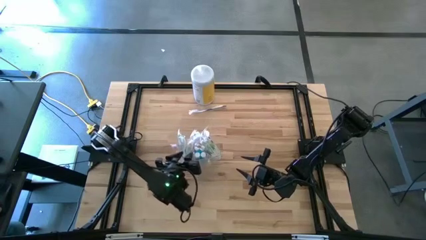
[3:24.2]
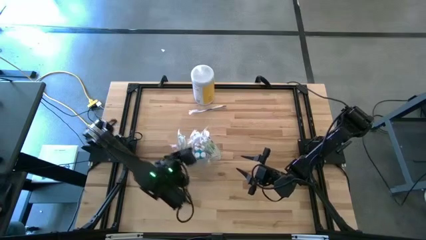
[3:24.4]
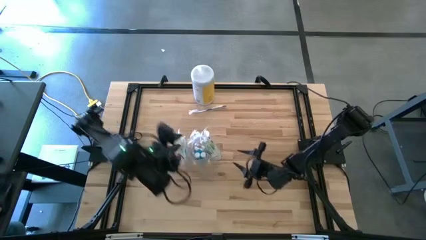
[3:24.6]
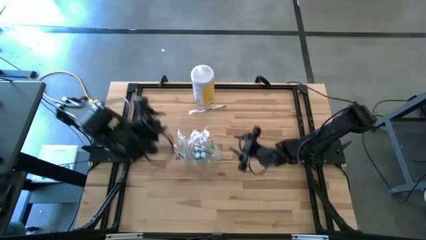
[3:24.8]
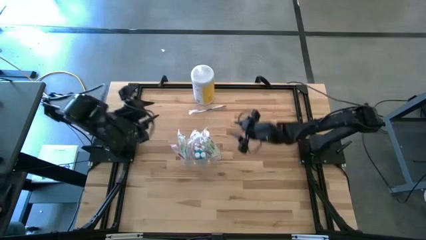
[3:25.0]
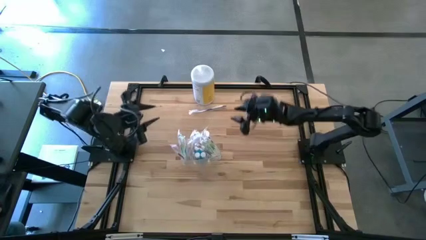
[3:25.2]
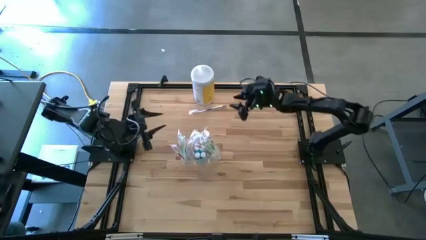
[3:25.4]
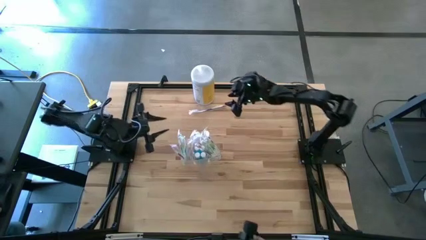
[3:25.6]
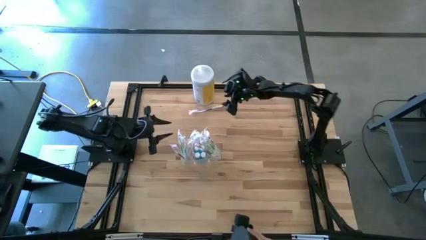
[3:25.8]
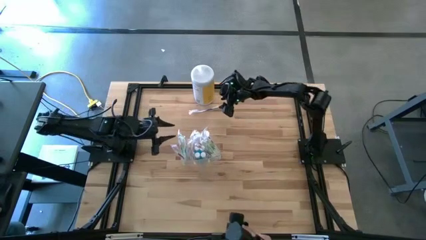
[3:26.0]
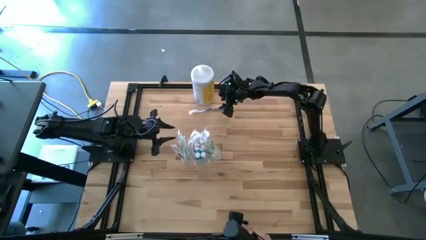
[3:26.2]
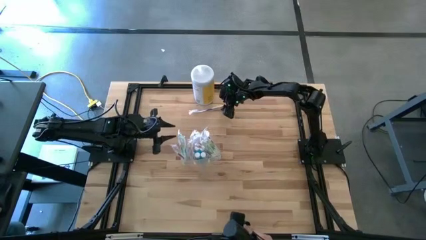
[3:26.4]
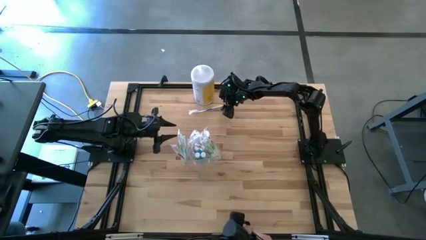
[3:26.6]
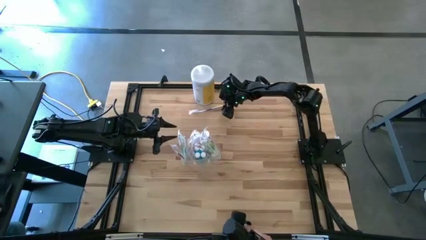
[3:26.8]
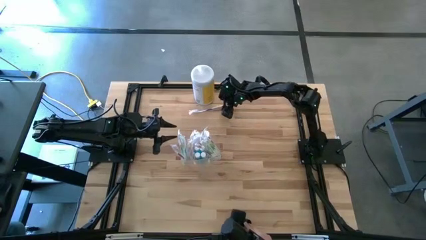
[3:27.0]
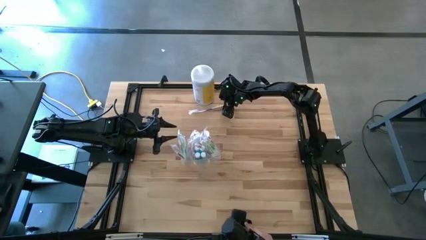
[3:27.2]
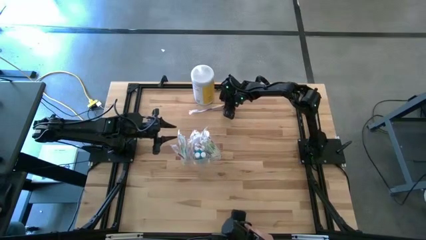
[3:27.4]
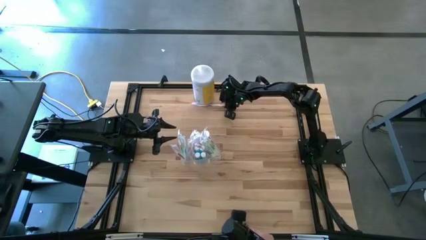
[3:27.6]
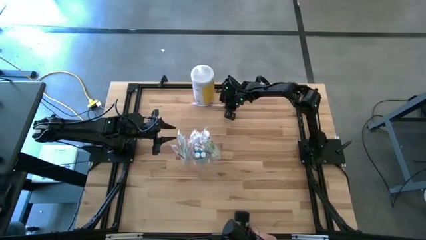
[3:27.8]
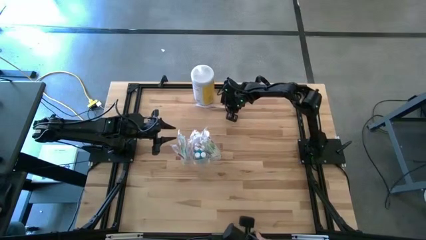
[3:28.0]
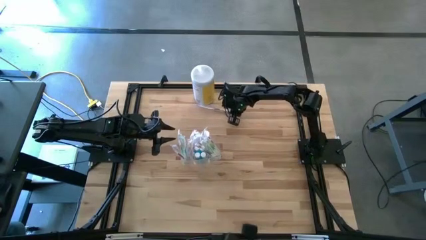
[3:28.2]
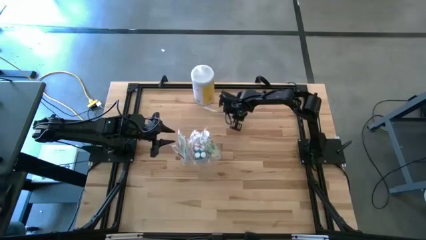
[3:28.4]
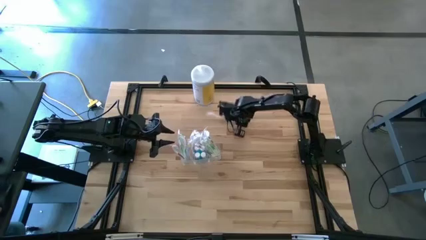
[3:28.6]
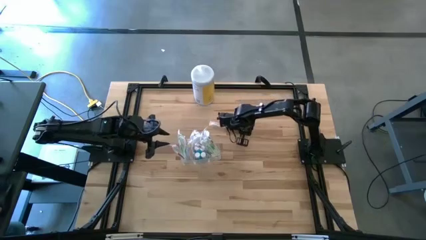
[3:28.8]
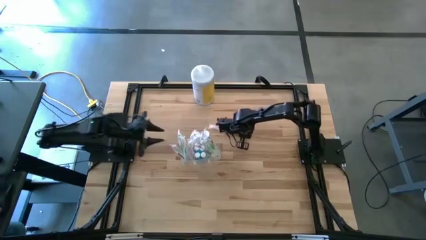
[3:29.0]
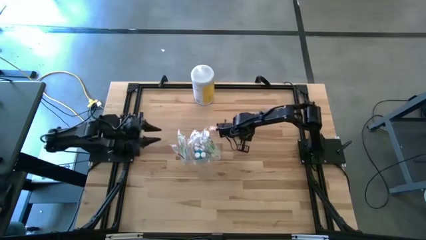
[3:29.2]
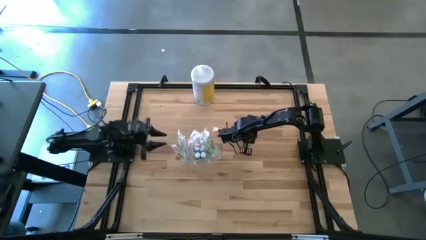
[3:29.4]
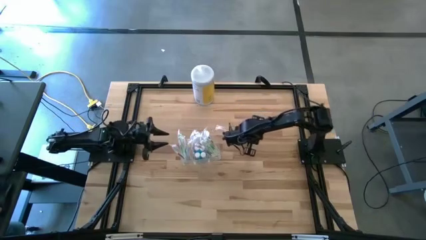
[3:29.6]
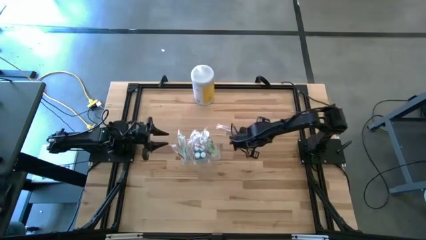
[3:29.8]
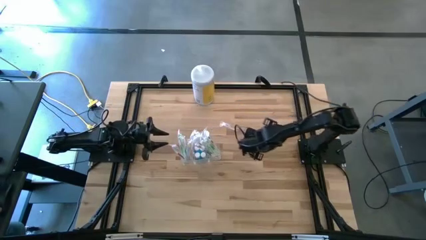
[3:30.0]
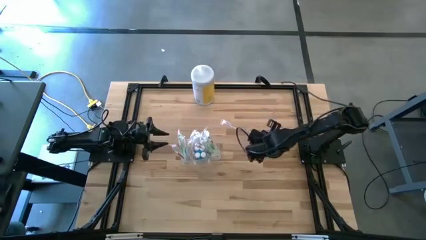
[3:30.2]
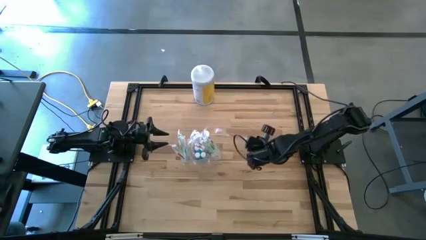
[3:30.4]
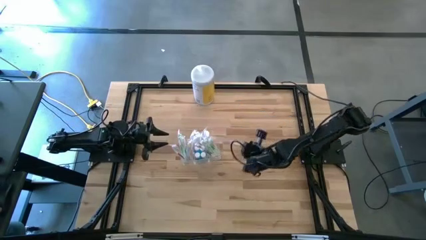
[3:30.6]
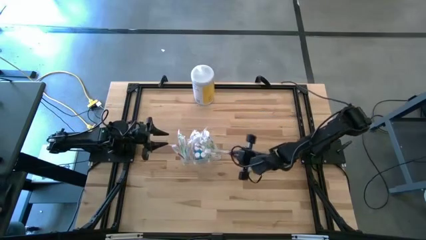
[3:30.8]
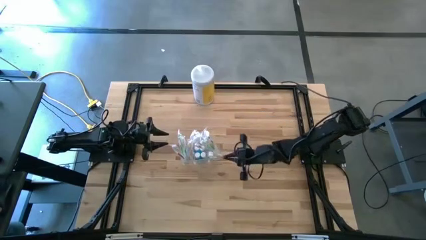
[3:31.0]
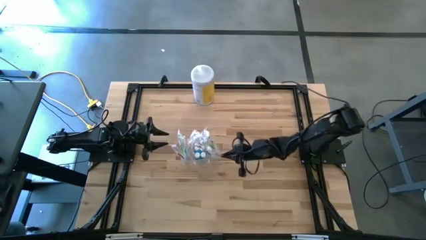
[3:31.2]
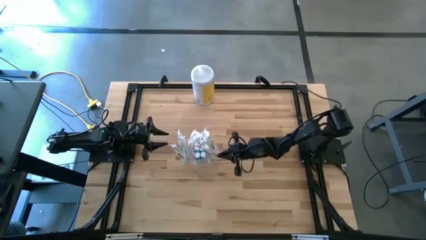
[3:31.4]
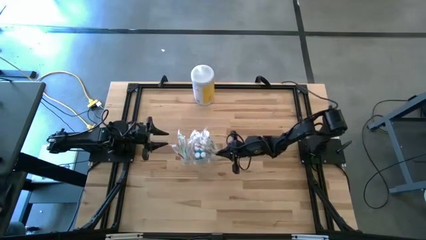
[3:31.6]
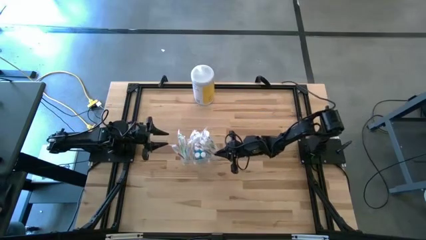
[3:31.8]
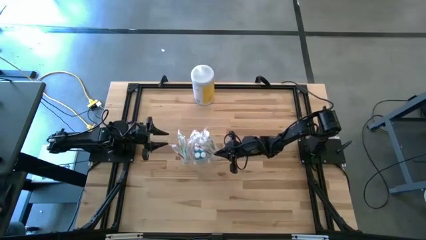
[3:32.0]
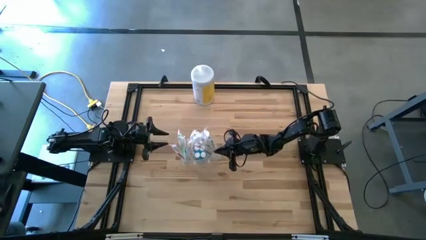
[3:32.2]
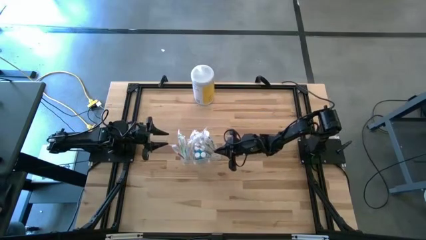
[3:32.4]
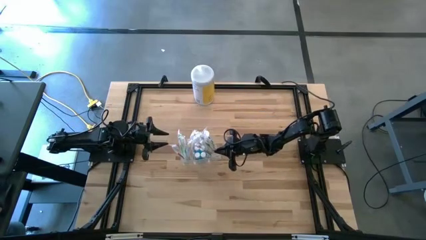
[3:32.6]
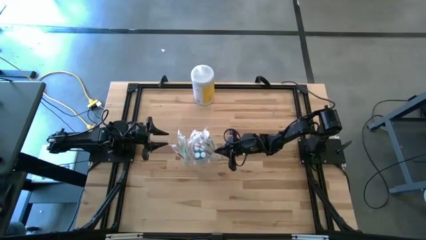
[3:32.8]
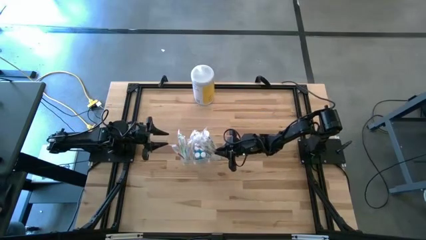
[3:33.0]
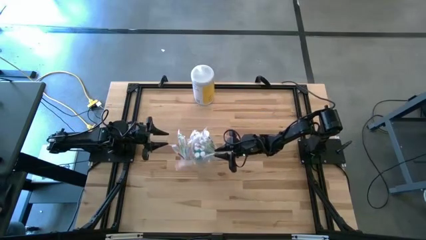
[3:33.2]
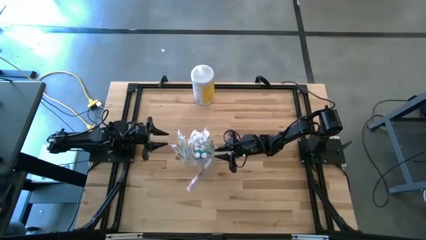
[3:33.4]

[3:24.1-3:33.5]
Task: Pick & Place toothbrushing station
Put the violet toothbrush into the transparent organizer

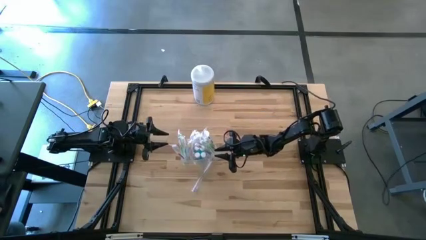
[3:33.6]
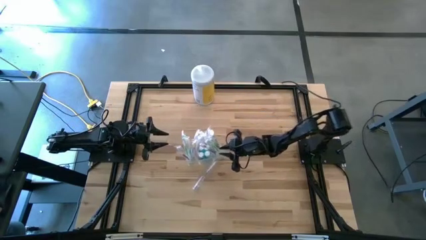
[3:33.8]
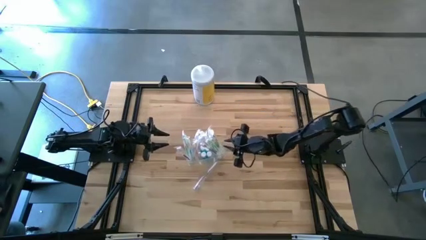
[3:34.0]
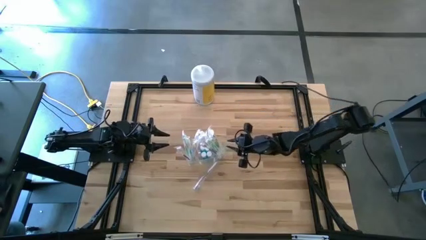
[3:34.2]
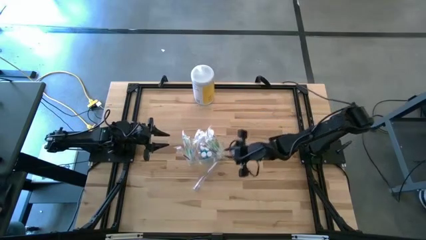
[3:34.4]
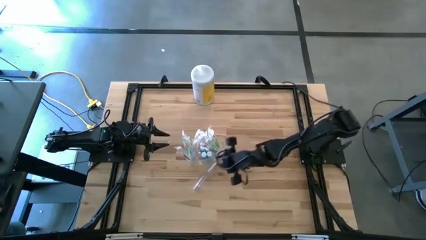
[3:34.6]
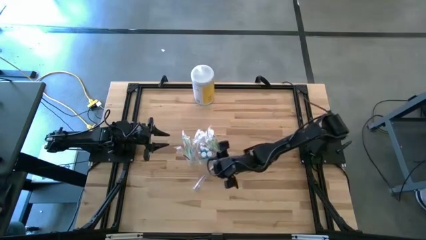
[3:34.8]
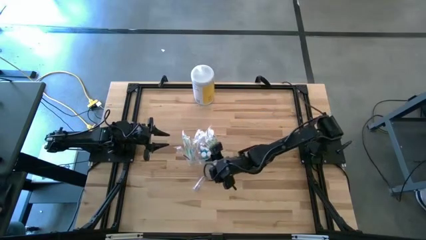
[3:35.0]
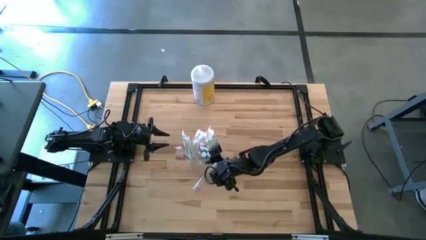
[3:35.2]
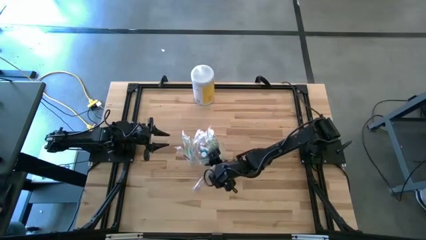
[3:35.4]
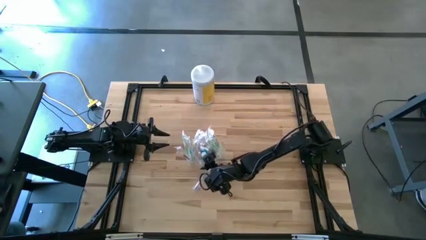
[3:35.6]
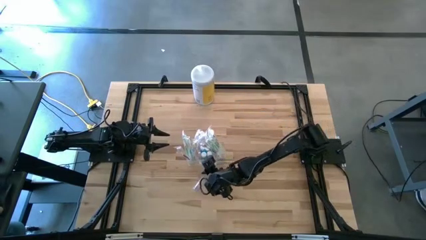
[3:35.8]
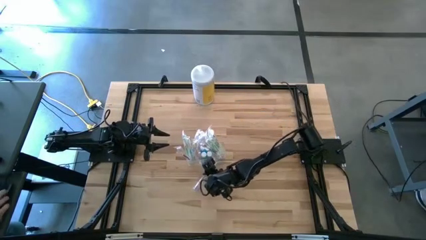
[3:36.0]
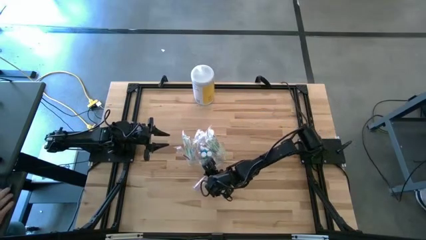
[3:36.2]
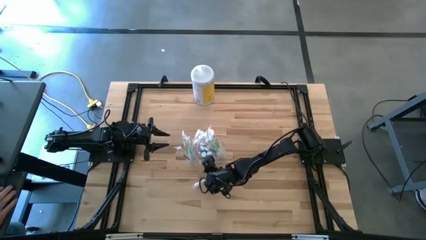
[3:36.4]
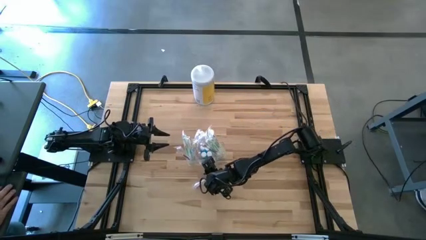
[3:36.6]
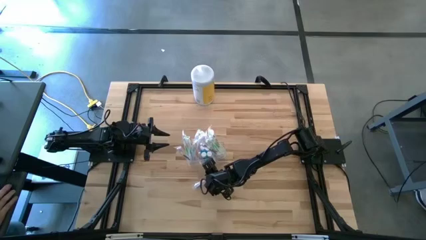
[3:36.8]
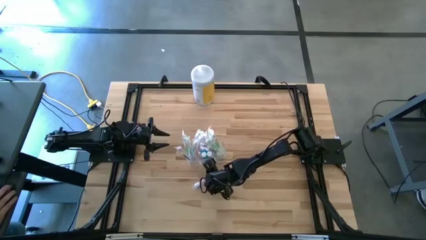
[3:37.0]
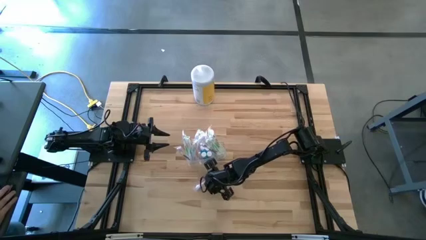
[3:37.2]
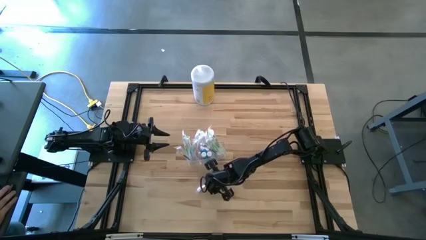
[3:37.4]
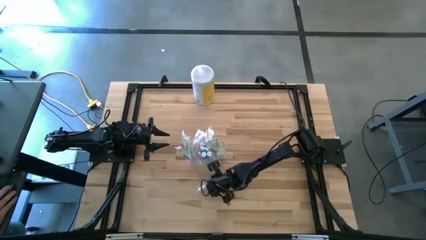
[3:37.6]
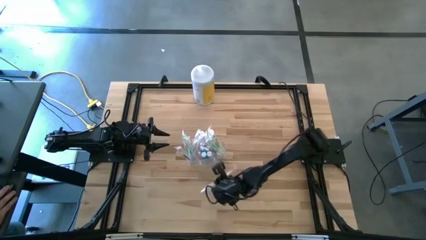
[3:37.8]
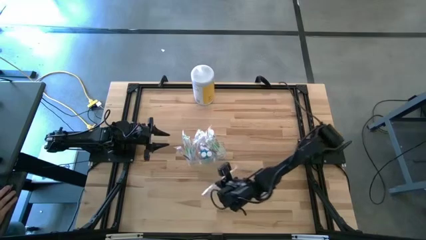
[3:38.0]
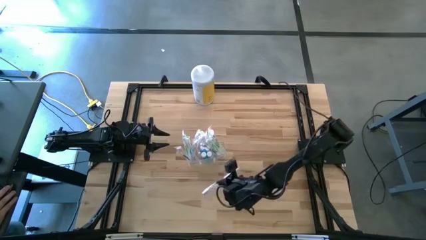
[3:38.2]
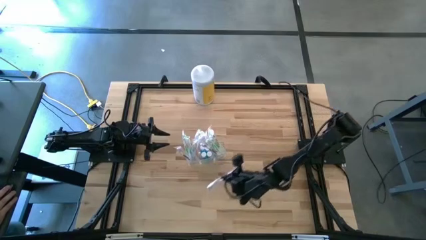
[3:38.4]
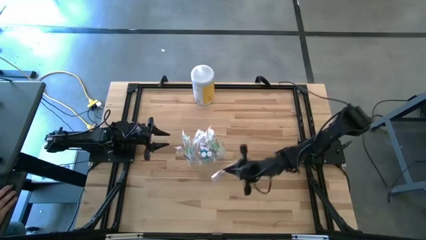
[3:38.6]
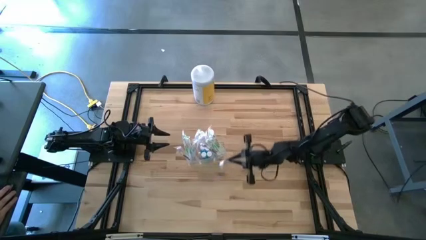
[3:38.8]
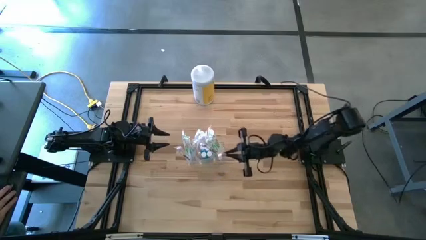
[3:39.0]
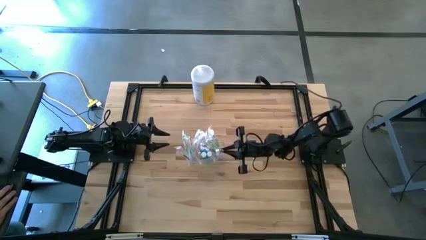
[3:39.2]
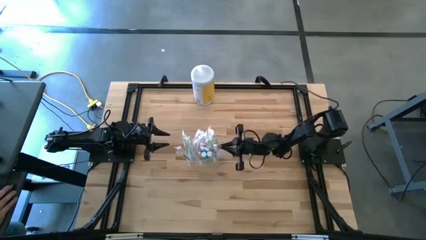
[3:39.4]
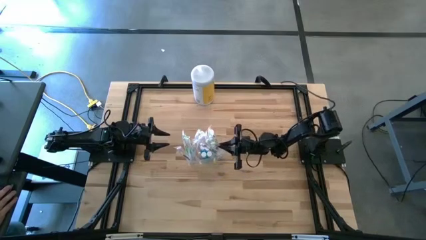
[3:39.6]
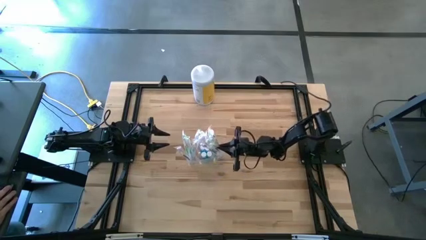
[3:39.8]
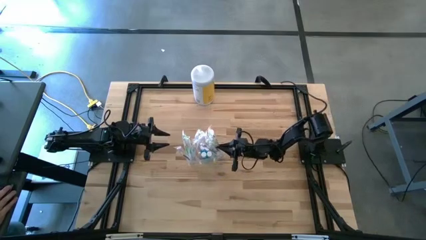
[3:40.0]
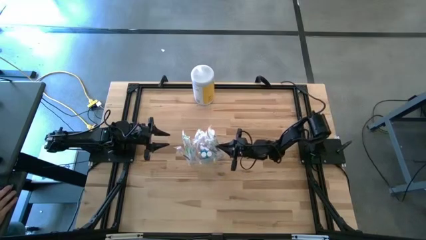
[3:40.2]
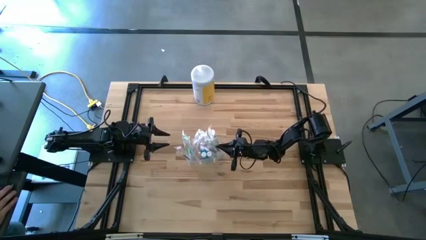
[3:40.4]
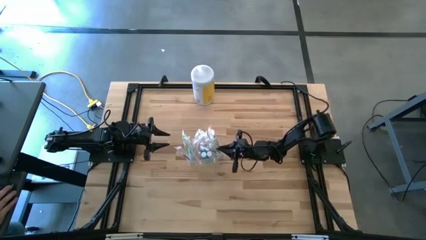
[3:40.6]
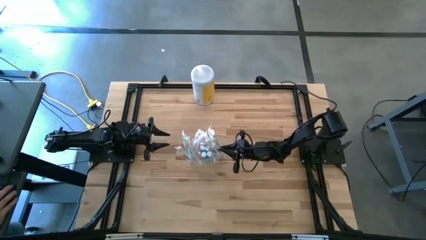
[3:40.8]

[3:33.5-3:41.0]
Put the violet toothbrush into the transparent organizer
